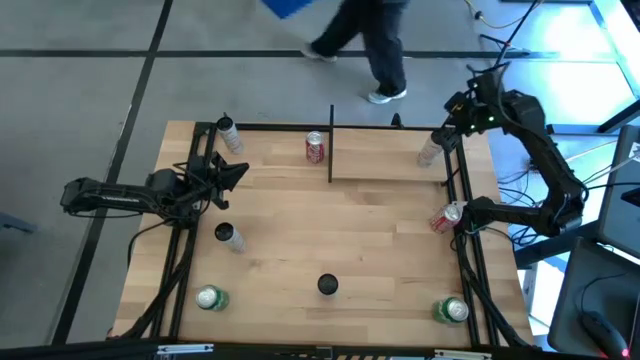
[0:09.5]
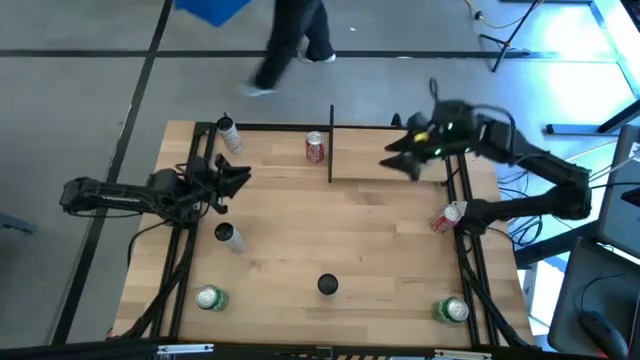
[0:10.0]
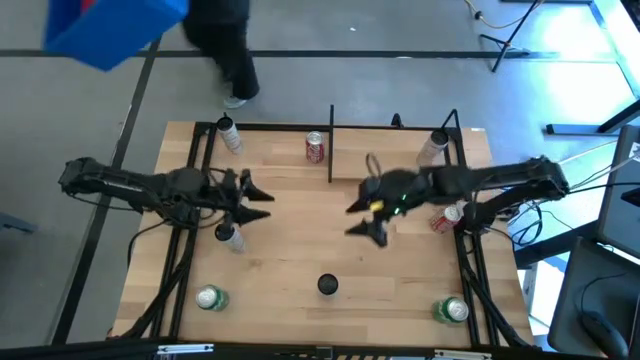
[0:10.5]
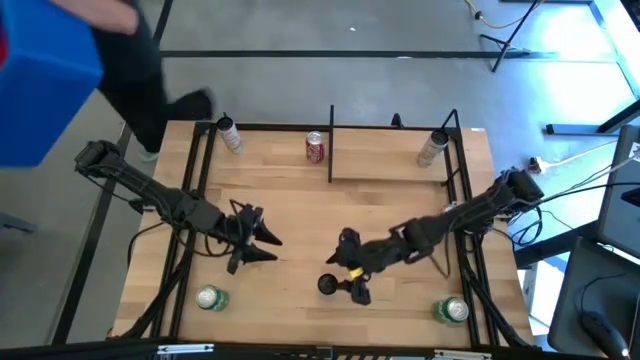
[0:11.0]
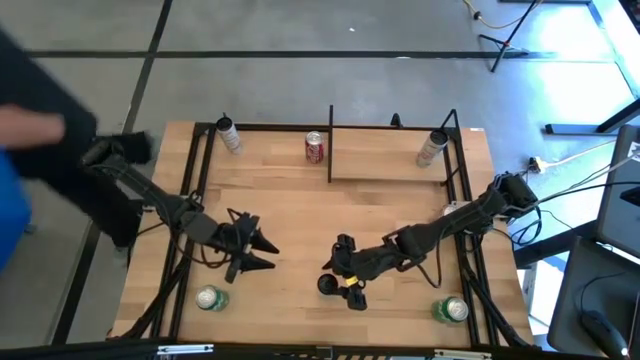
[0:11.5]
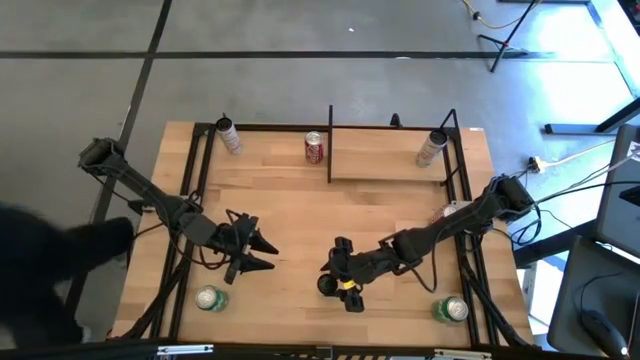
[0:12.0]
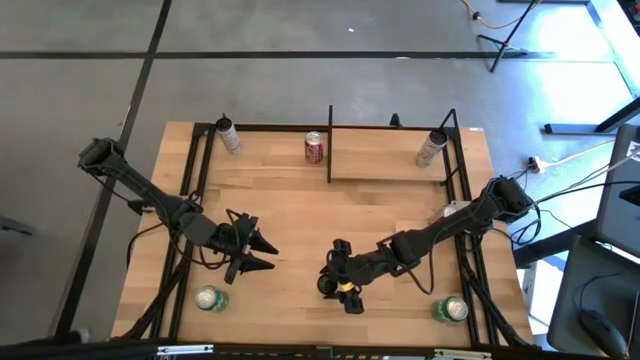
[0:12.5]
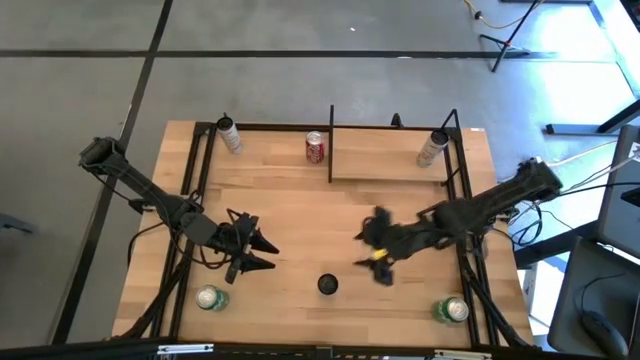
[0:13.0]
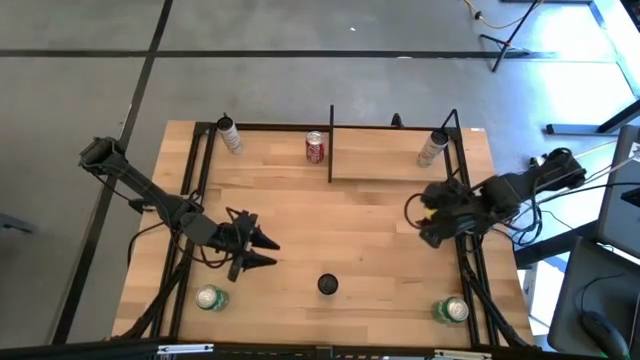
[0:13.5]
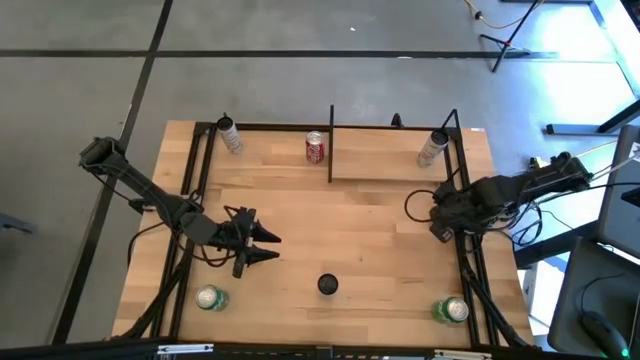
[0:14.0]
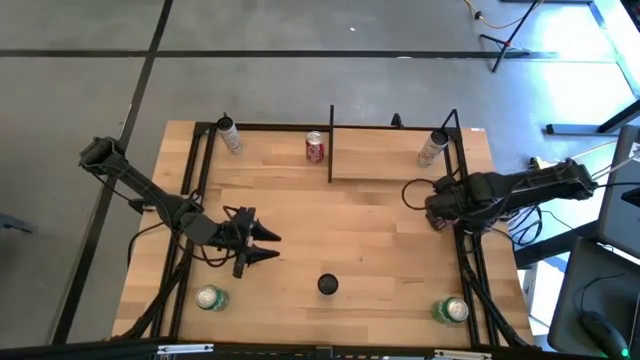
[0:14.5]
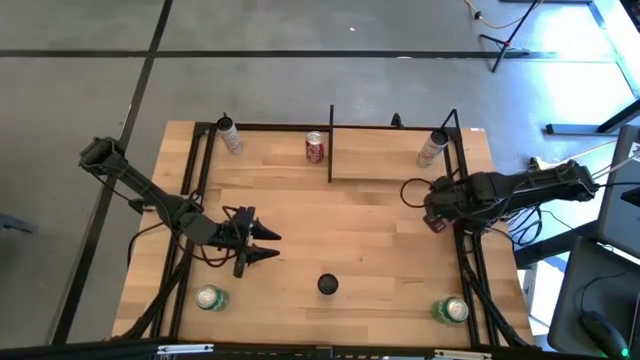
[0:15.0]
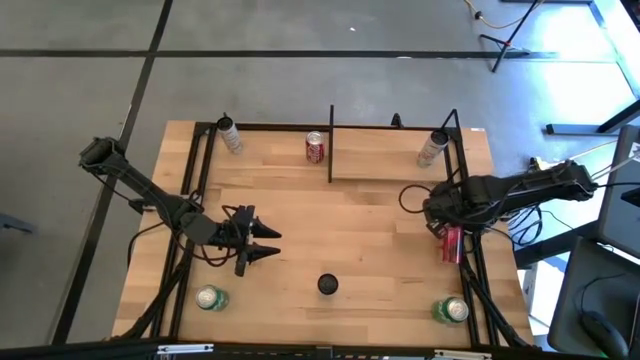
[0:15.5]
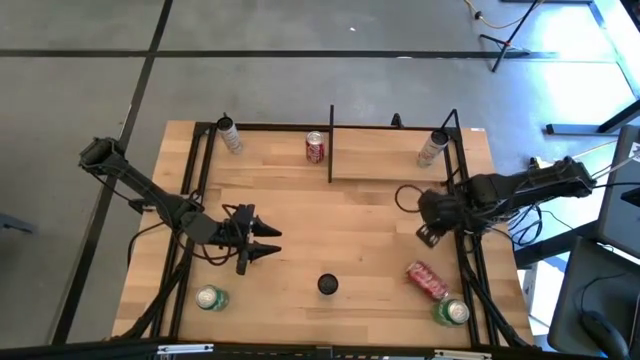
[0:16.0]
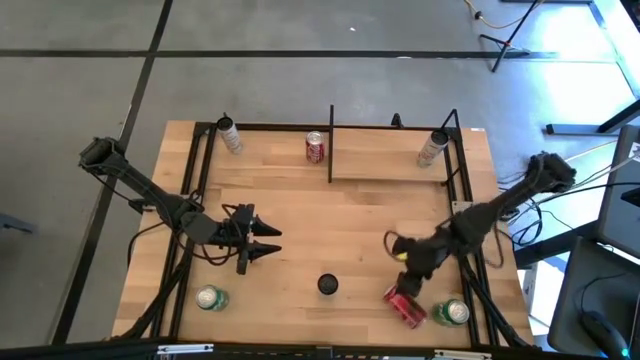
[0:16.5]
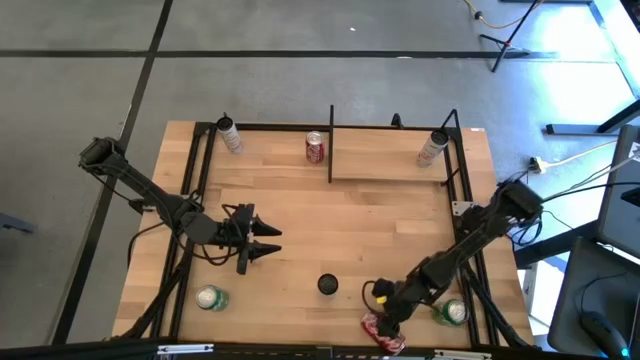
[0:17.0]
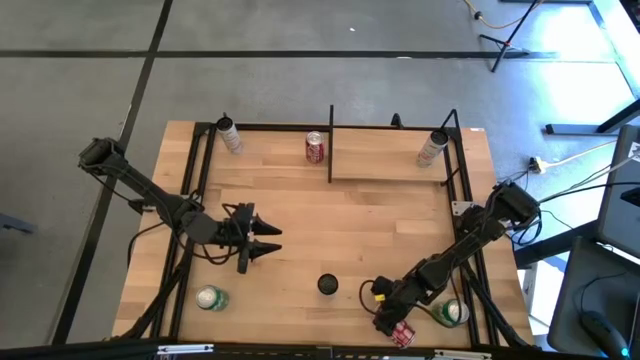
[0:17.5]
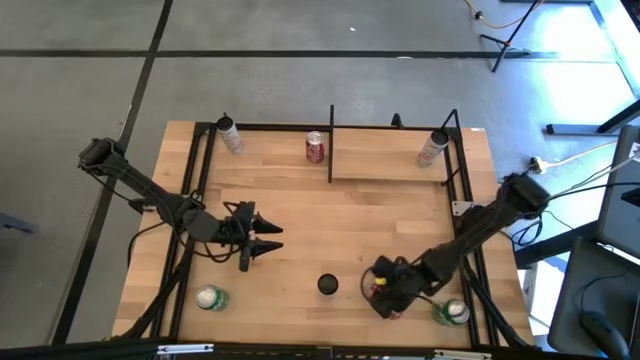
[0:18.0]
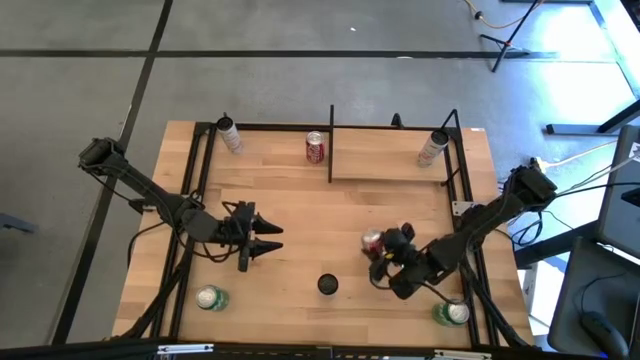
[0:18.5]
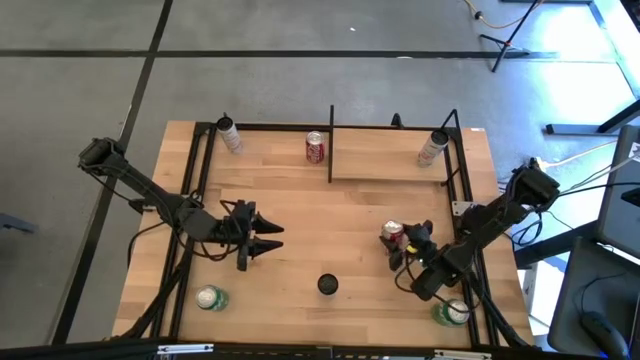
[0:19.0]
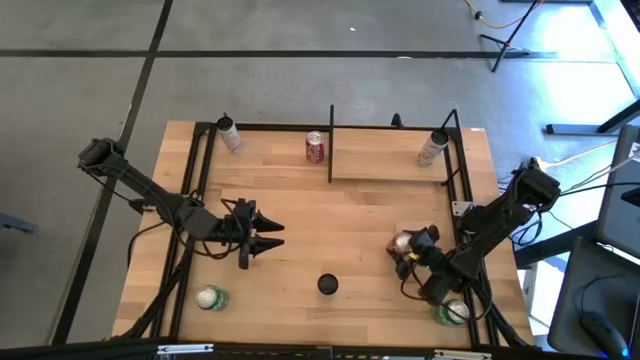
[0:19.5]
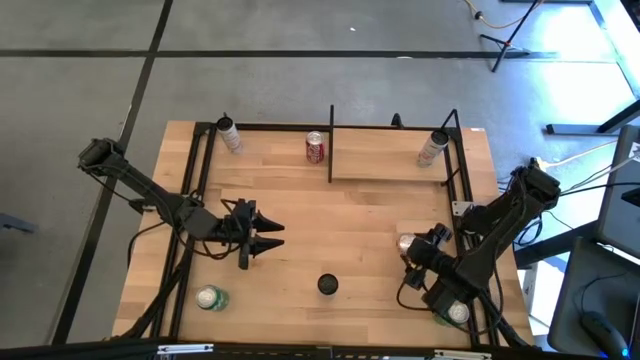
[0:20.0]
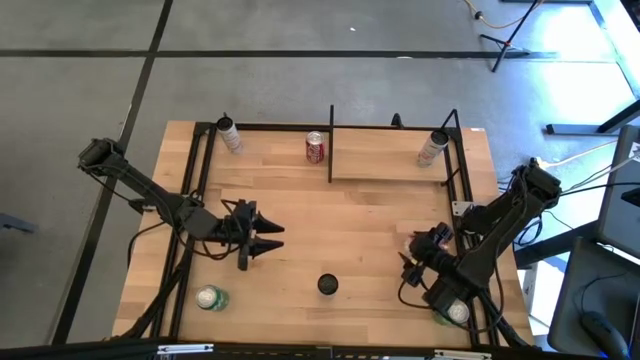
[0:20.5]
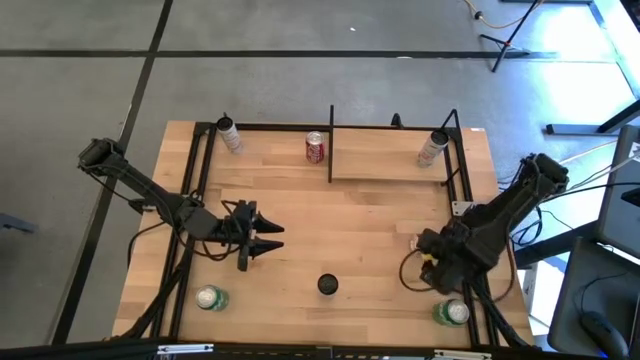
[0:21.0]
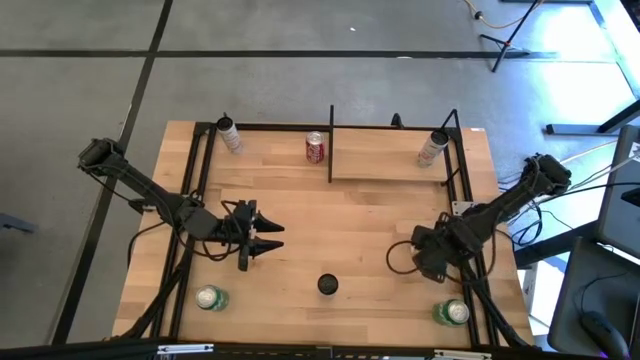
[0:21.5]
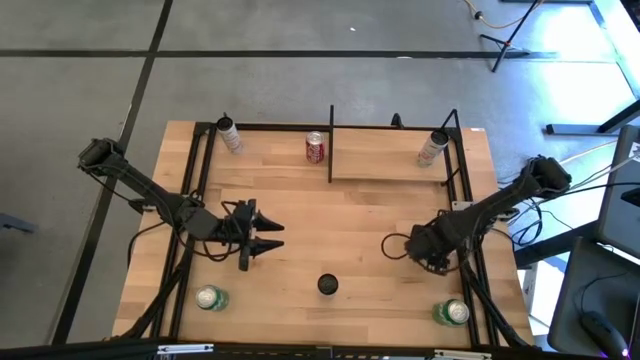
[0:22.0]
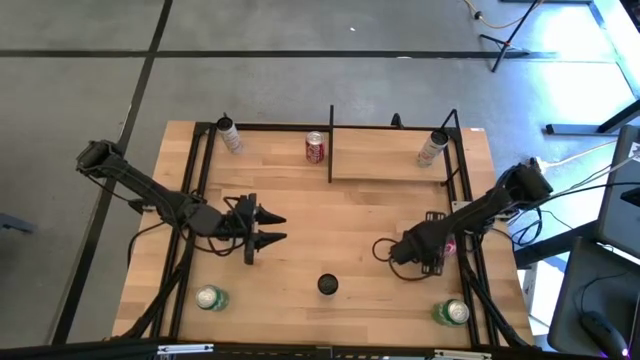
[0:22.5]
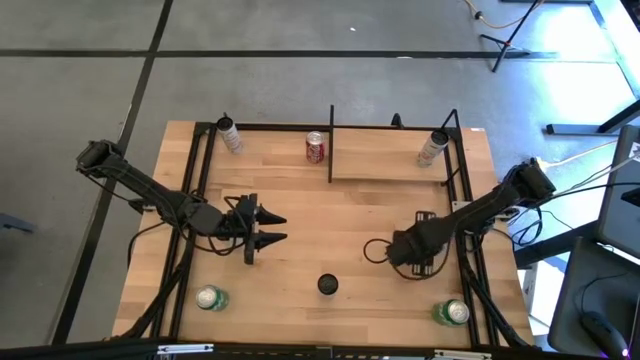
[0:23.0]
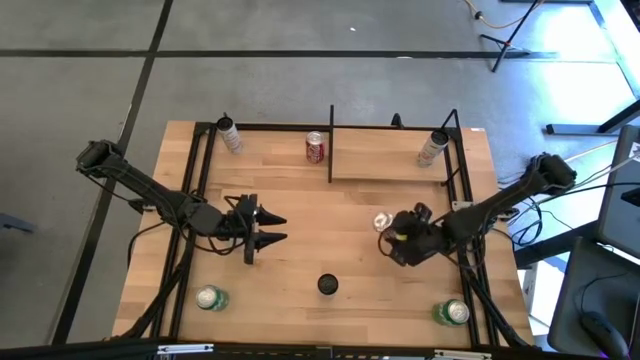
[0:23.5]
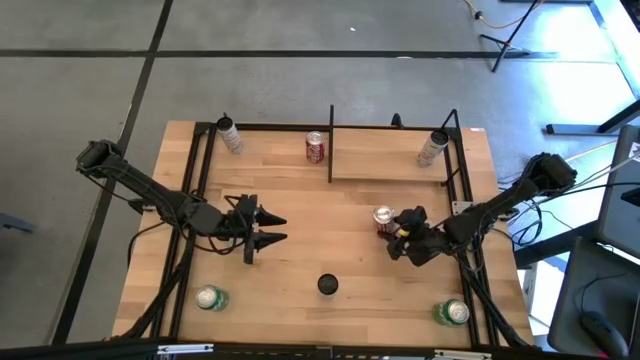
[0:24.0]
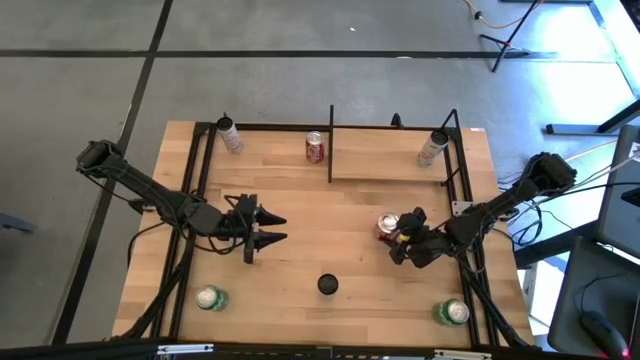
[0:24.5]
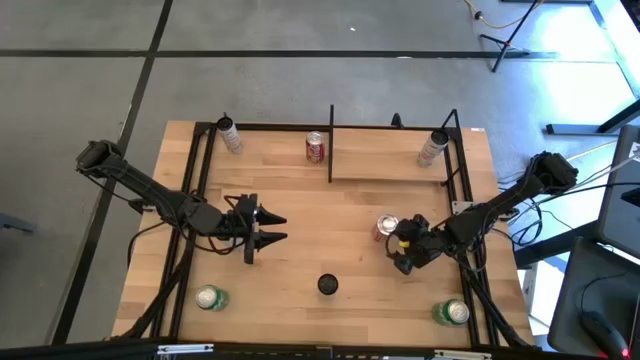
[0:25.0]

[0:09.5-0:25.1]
Task: Place canned beverage on shelf
Put the red soda can on the shelf

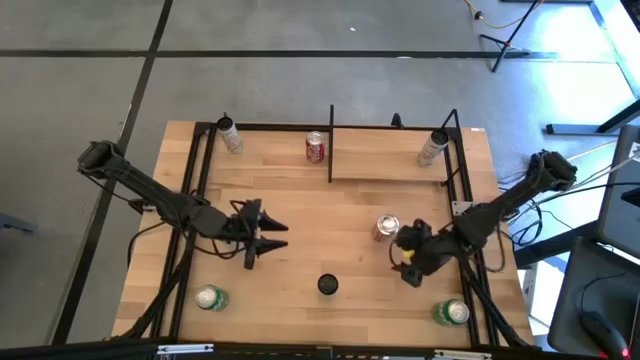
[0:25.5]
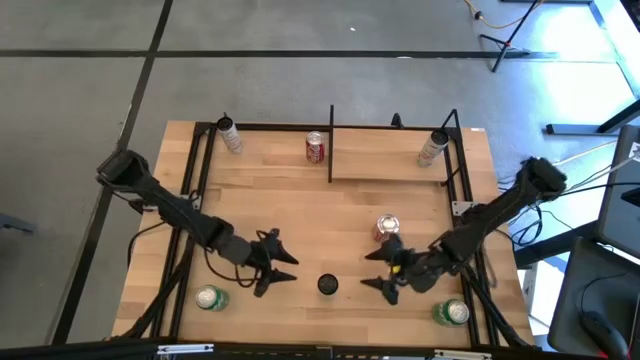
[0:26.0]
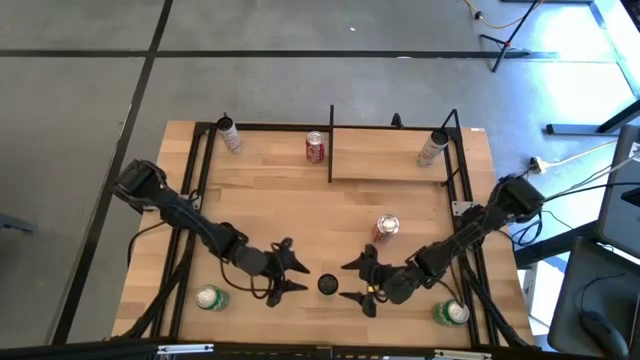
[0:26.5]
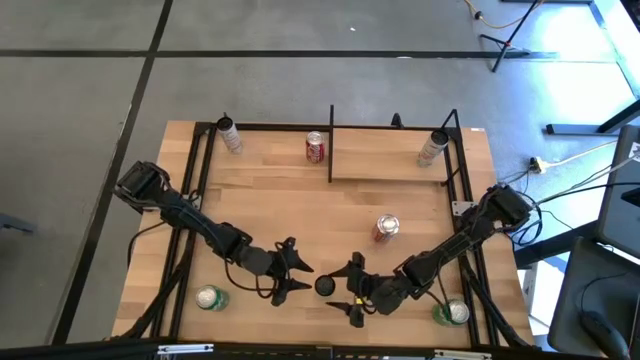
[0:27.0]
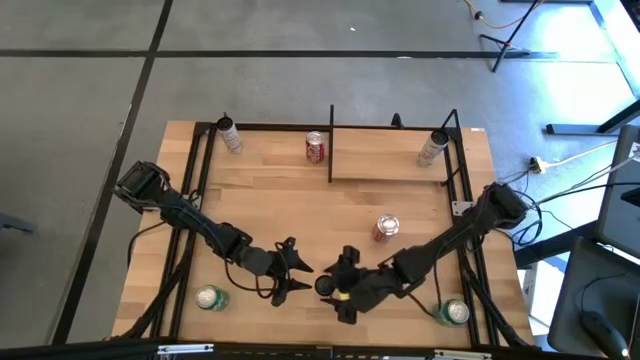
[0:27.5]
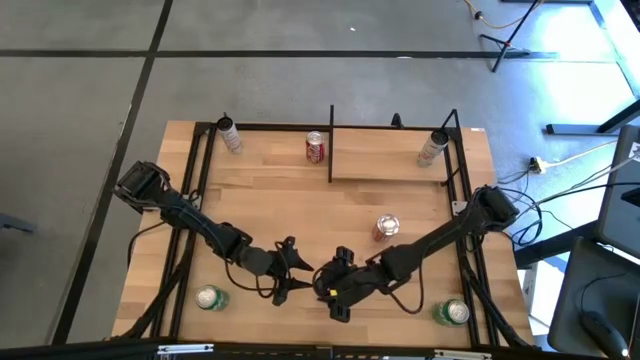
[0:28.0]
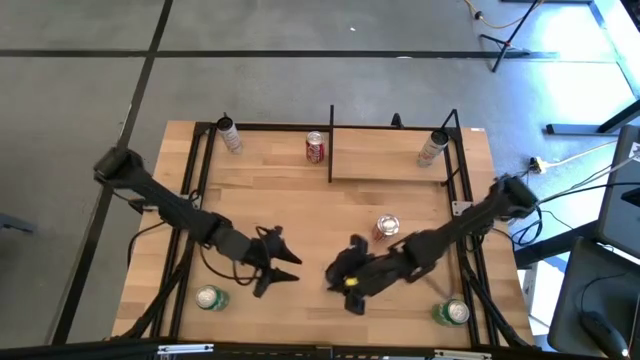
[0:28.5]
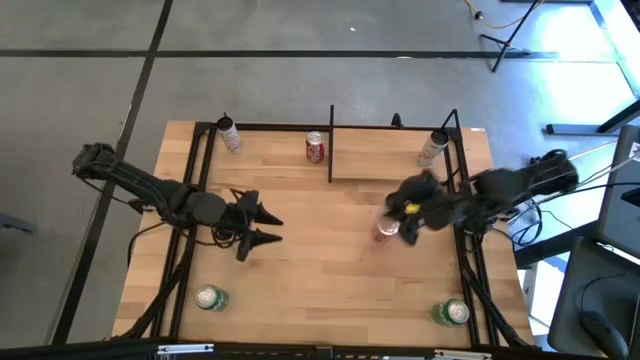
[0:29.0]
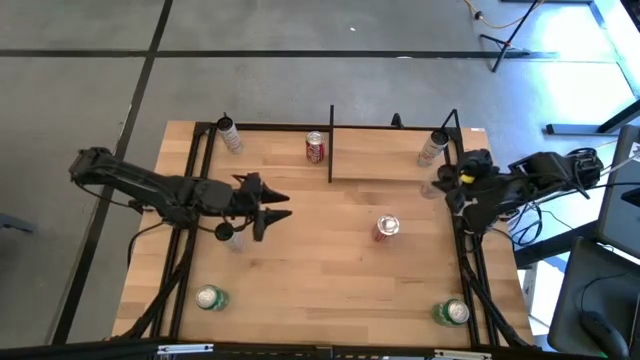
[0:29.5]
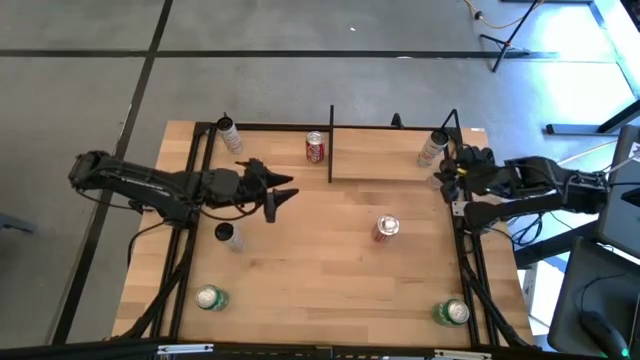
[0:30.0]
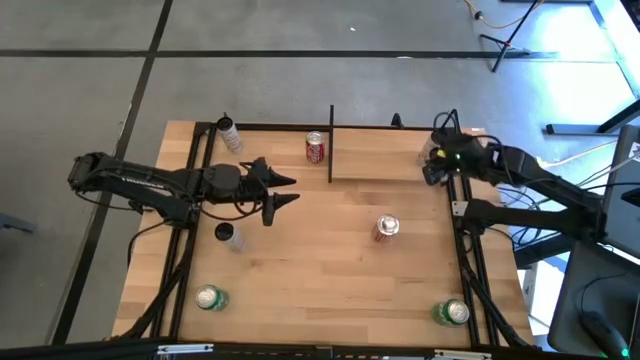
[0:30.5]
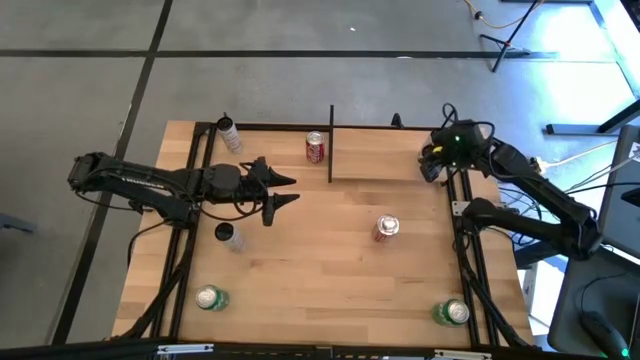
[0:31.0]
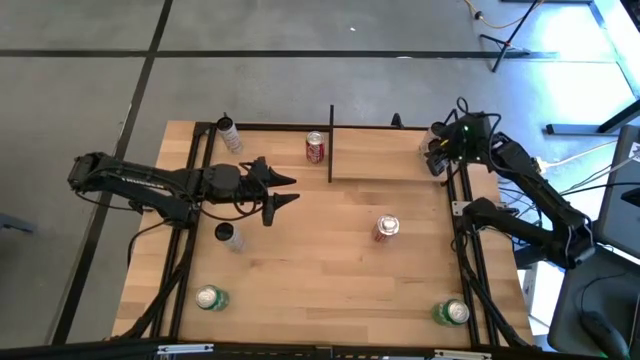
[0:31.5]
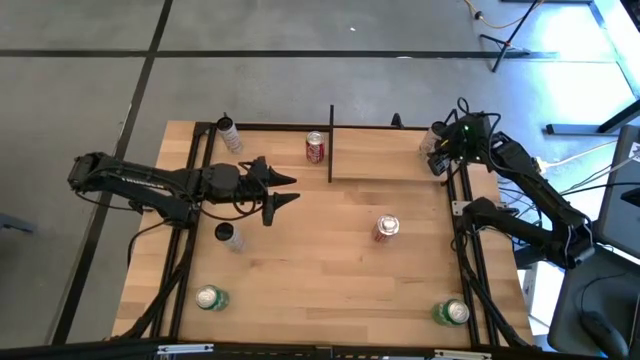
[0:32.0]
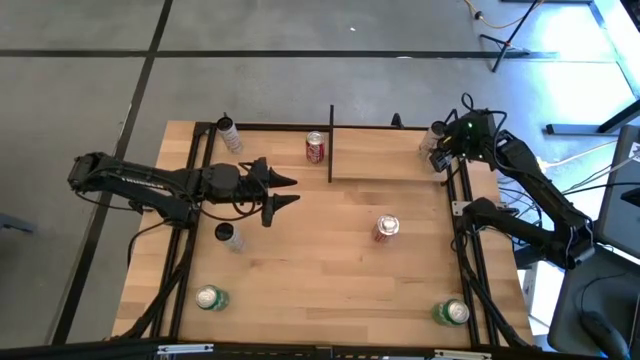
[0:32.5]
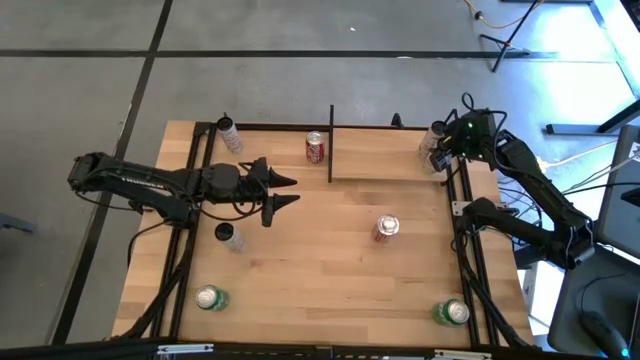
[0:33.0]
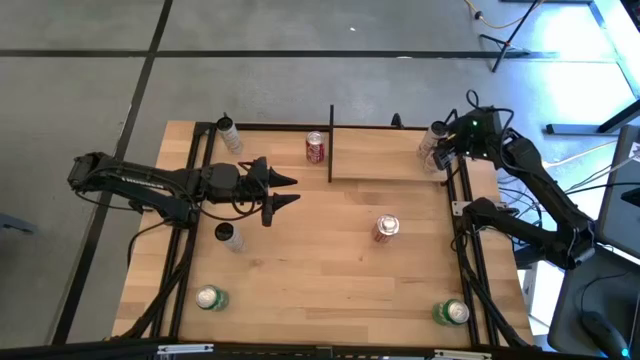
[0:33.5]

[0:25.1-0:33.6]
Put the white-pink soda can on the shelf aligned with the other white-pink soda can
